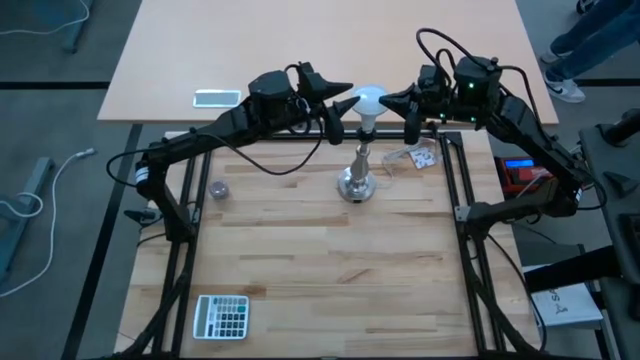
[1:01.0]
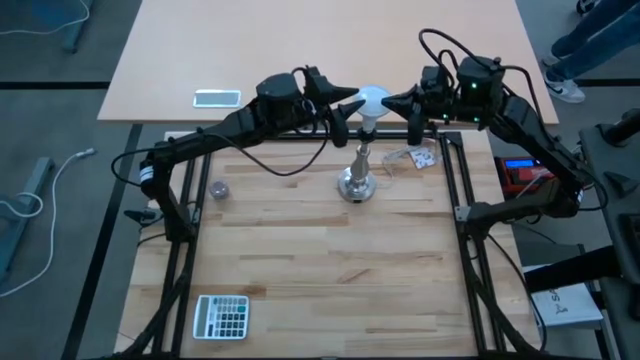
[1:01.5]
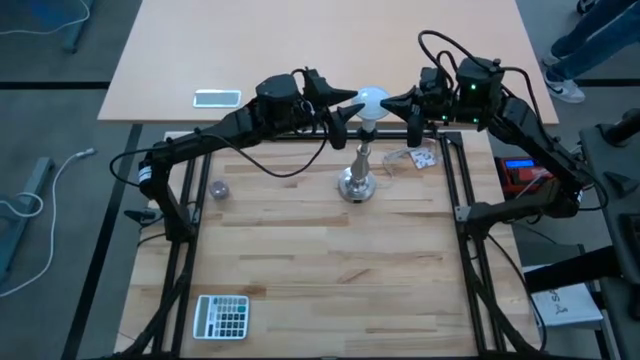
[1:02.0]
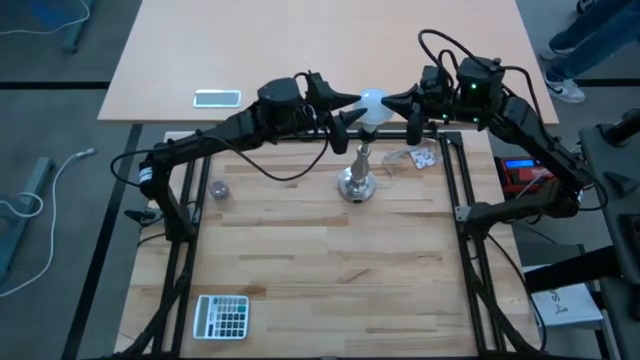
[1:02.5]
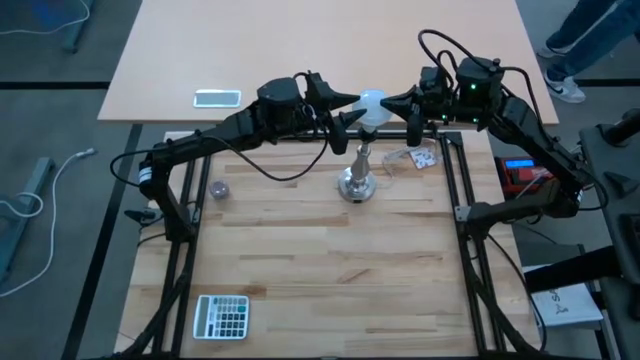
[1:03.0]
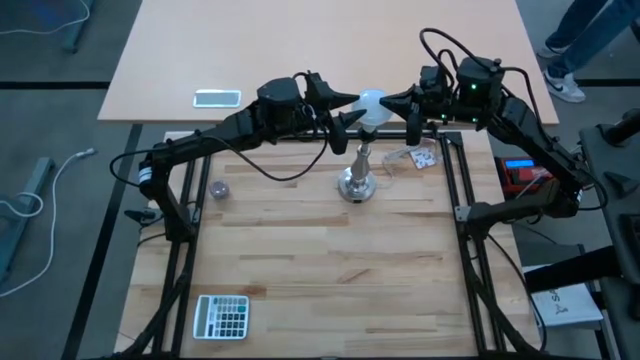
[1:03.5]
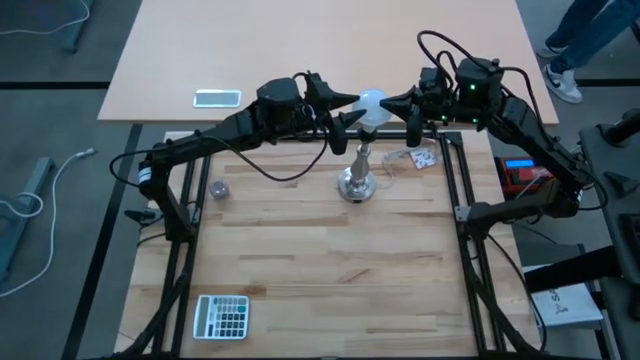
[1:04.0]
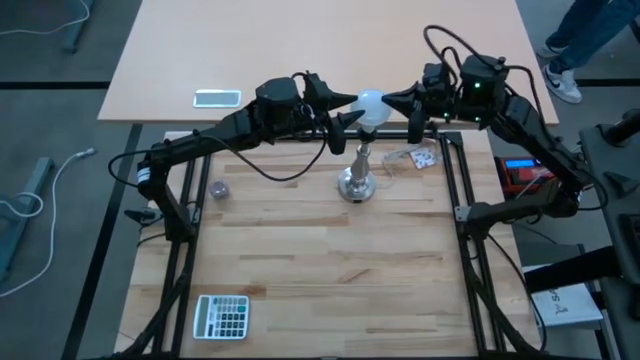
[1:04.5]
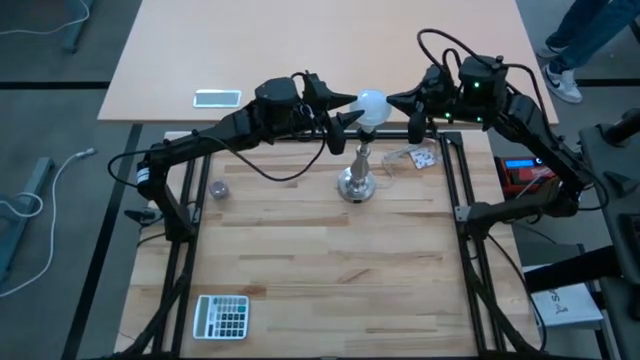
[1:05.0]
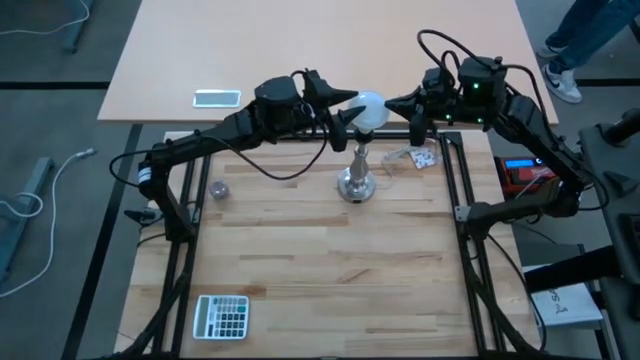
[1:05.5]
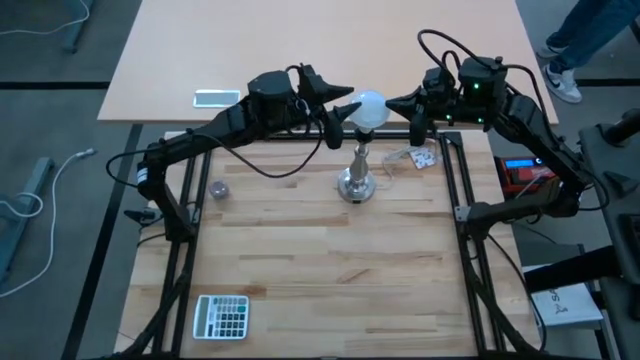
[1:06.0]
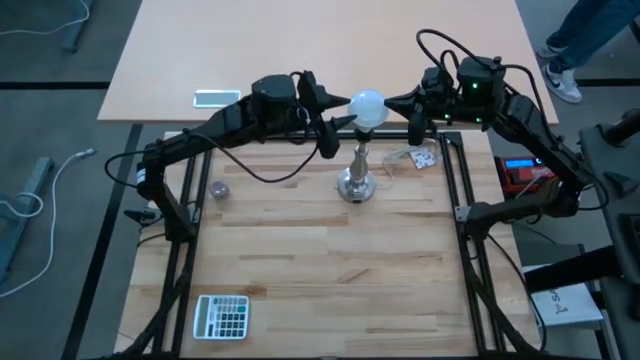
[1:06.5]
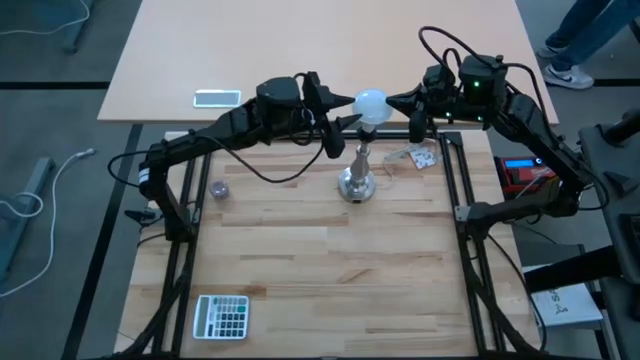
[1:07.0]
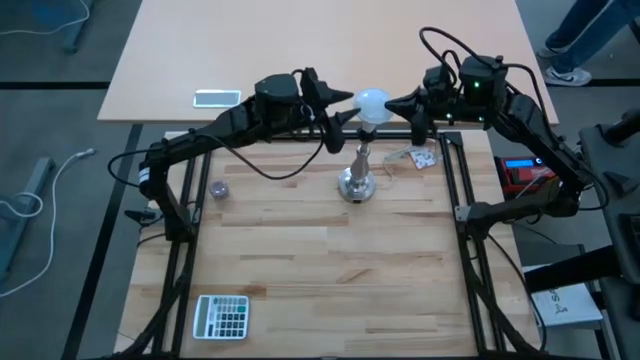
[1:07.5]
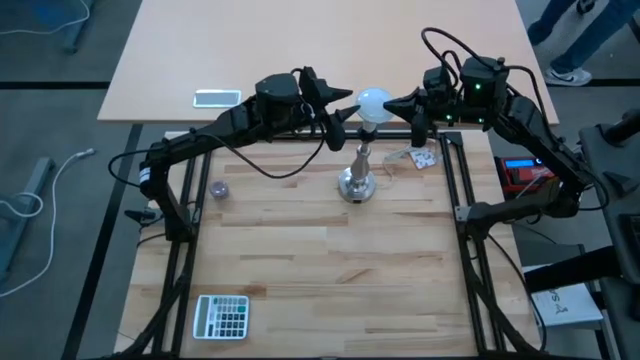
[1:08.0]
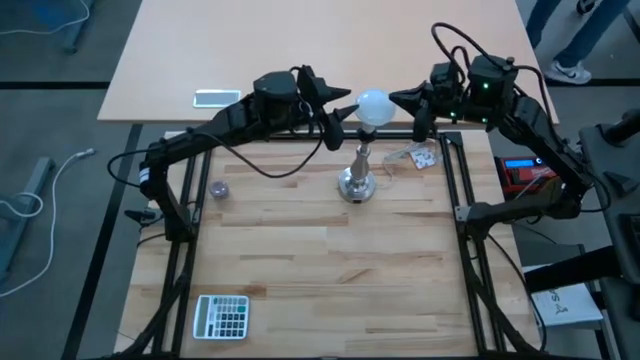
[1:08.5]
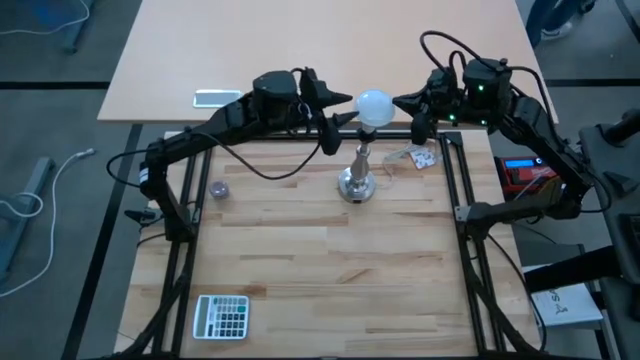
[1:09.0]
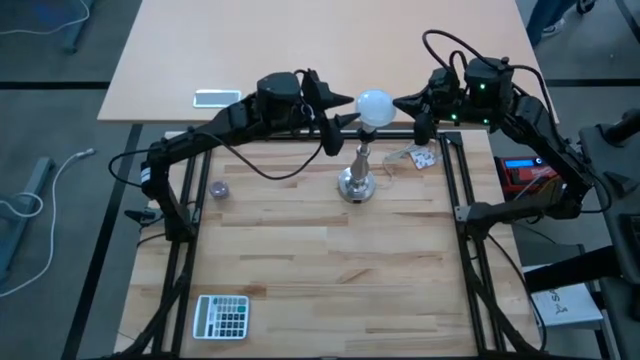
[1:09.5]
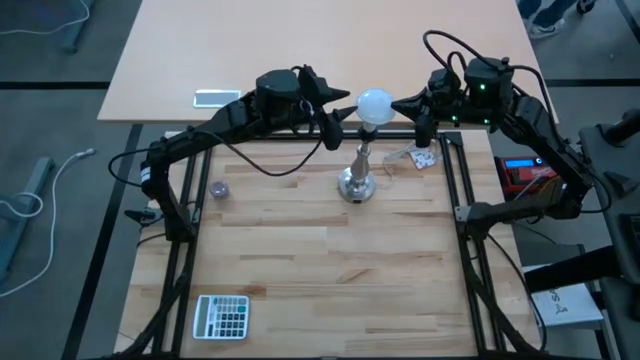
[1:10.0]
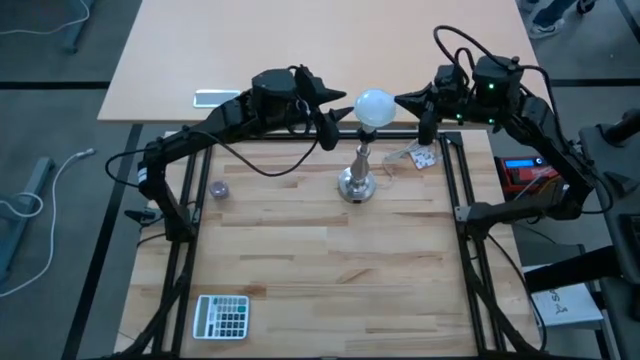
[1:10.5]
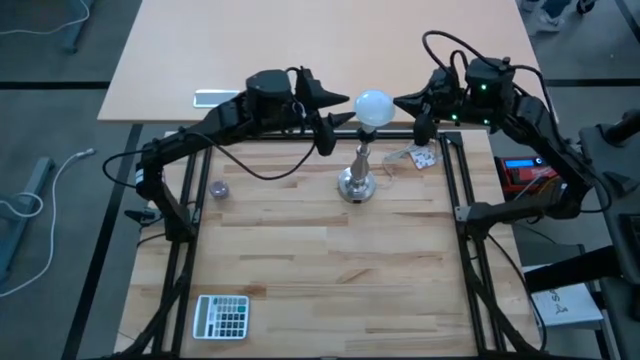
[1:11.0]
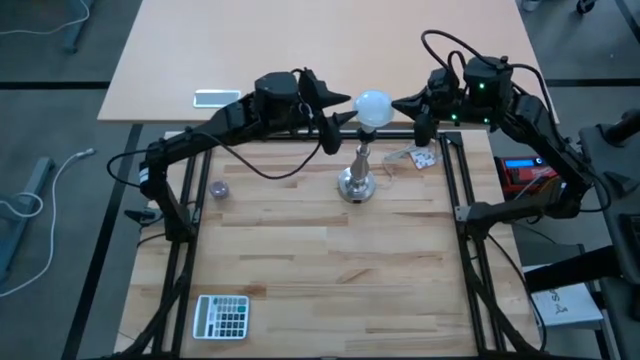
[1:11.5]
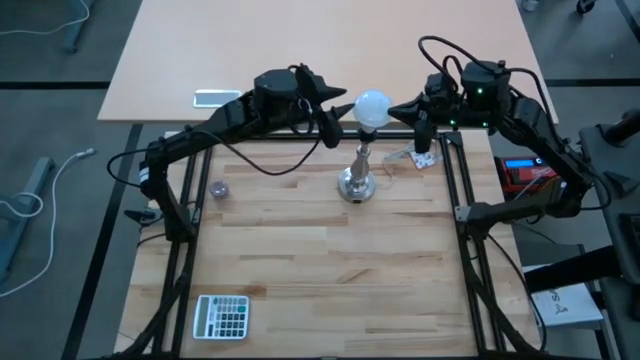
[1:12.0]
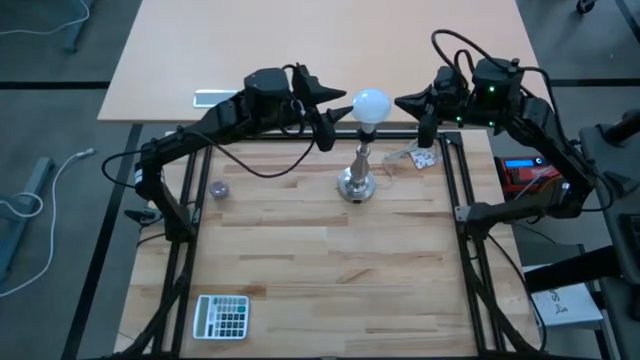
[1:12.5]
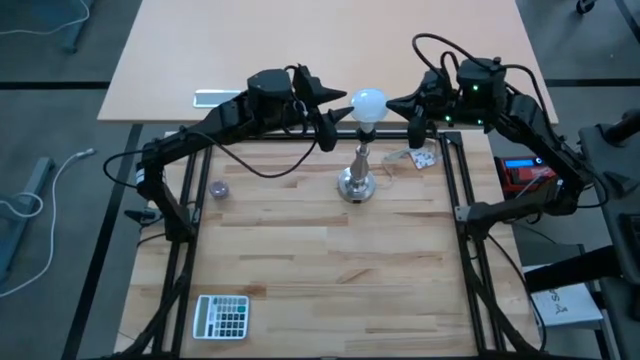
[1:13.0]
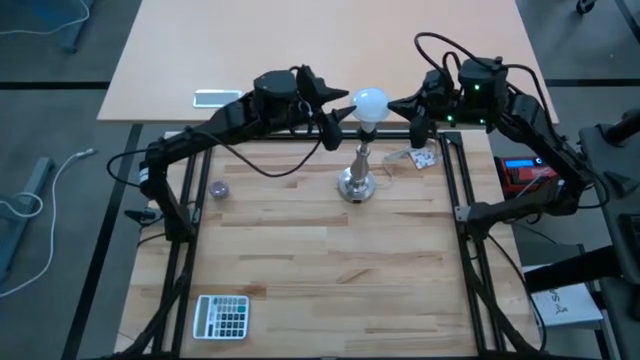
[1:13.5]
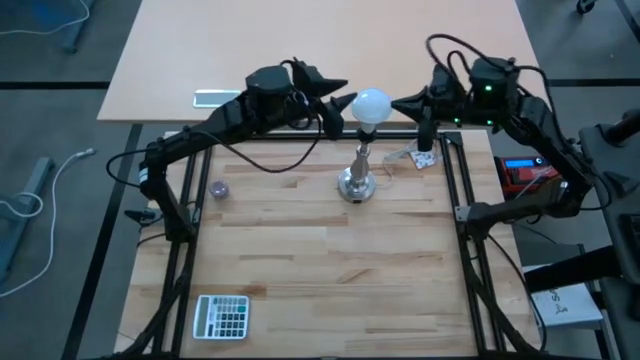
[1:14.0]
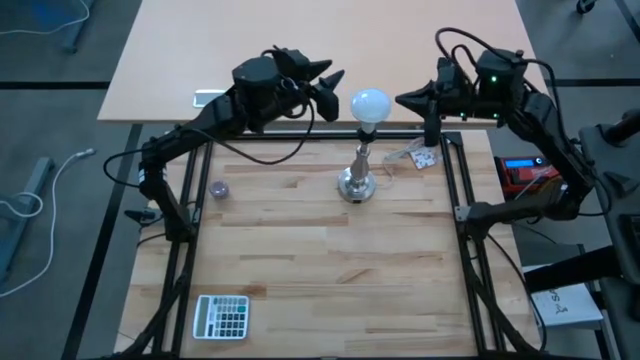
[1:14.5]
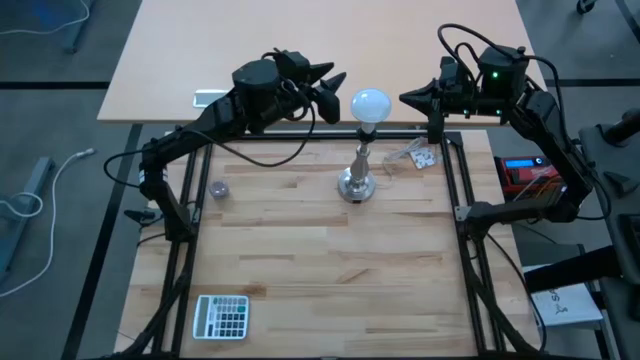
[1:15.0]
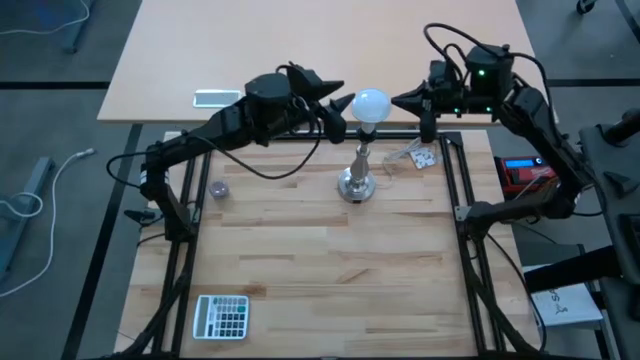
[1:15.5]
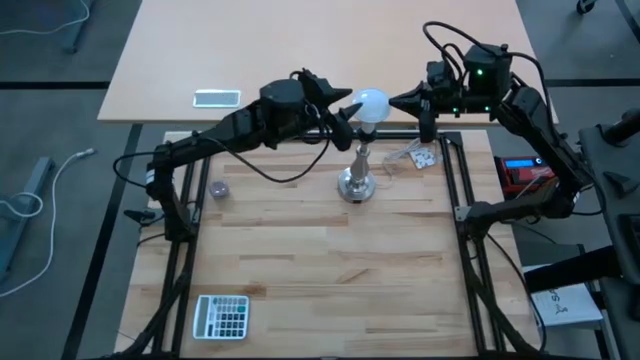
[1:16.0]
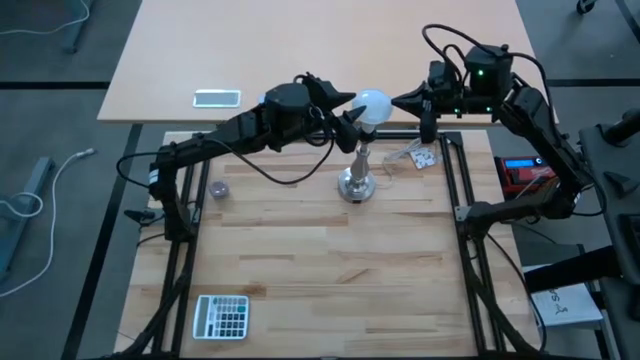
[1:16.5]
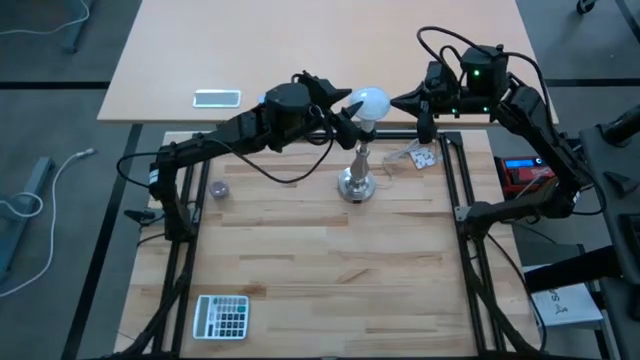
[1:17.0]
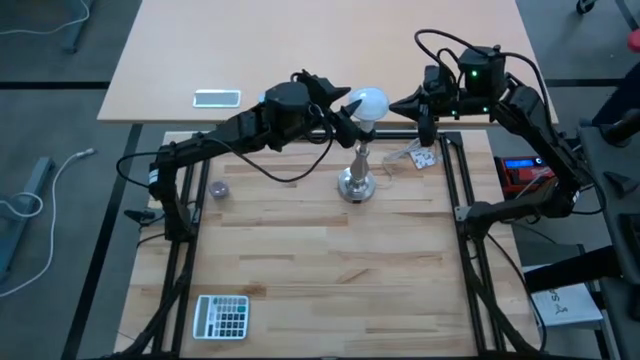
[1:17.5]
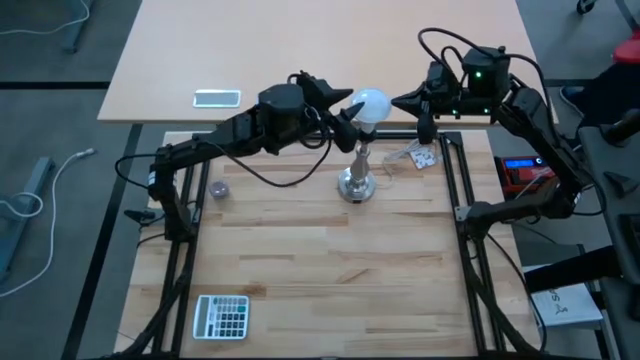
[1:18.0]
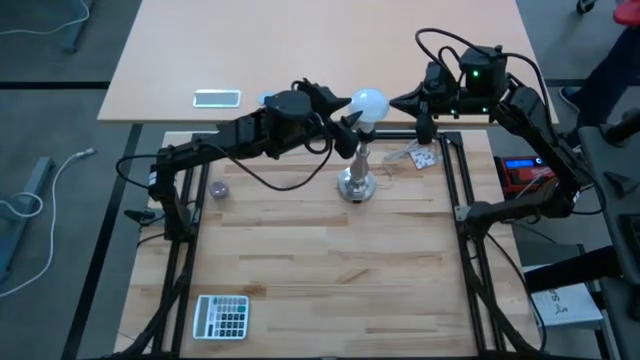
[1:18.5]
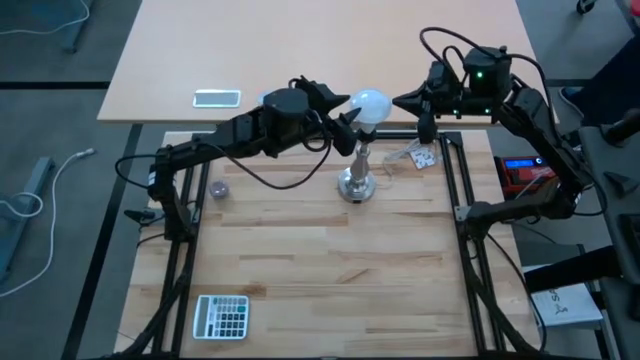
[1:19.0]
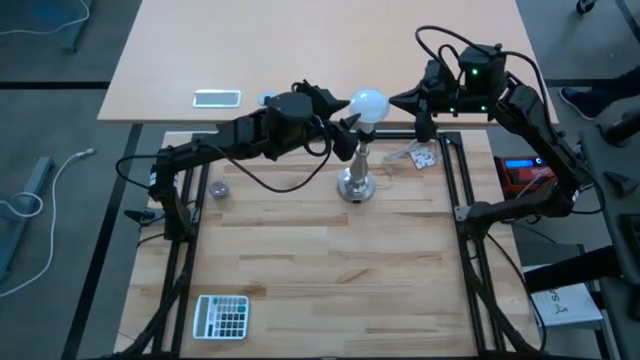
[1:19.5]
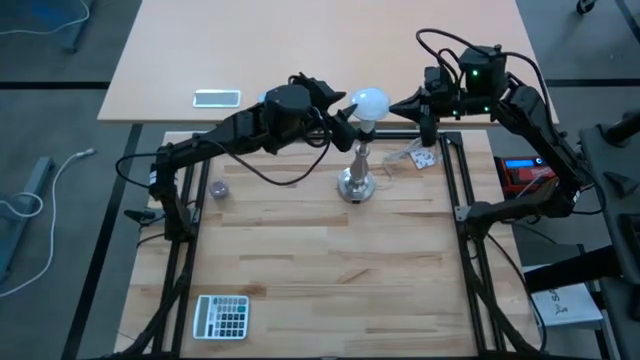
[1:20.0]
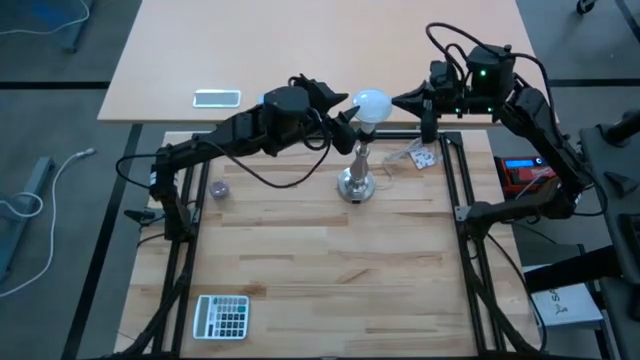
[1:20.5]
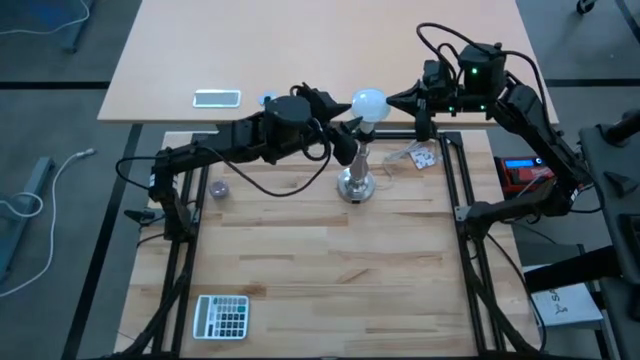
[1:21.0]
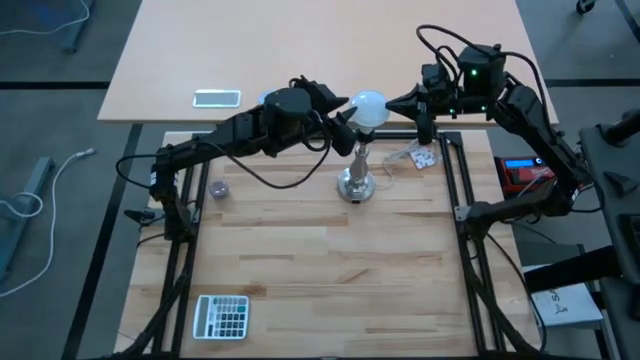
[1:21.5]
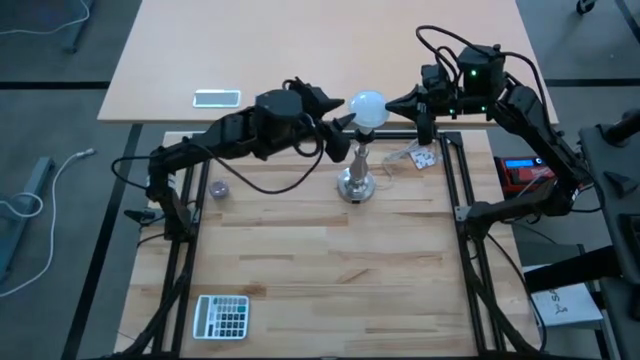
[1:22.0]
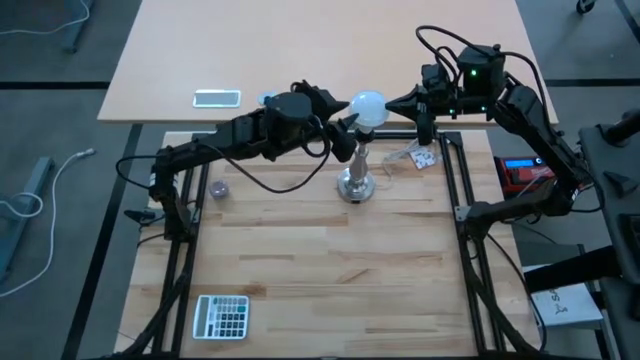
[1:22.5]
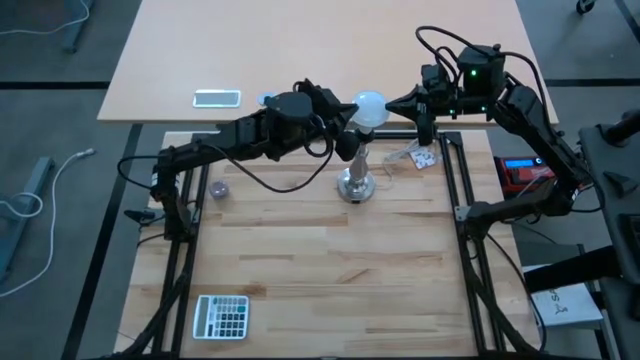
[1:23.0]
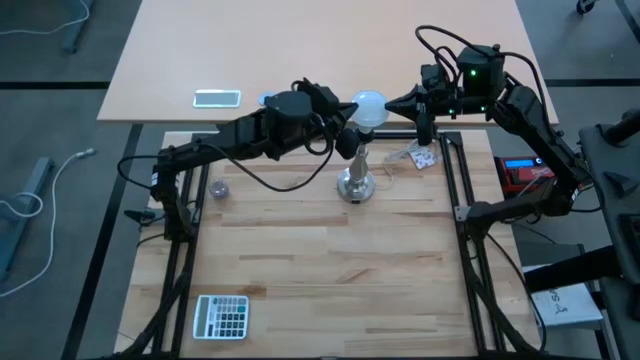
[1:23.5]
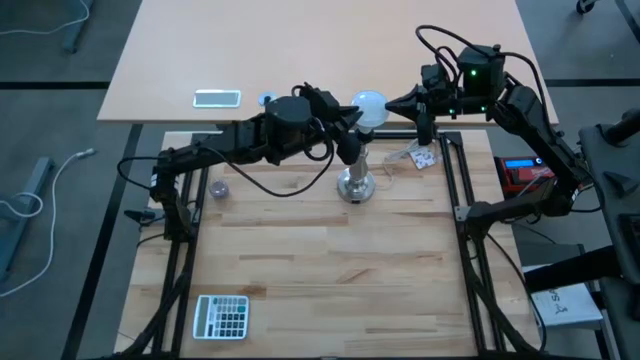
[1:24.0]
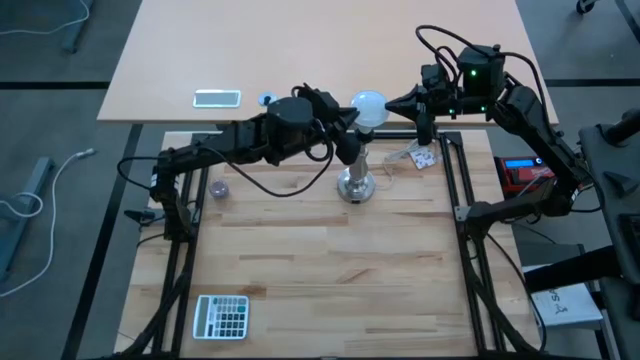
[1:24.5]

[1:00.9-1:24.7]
Task: Screw lightbulb
Insert the light bulb into the lamp
